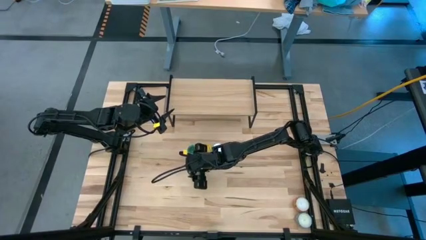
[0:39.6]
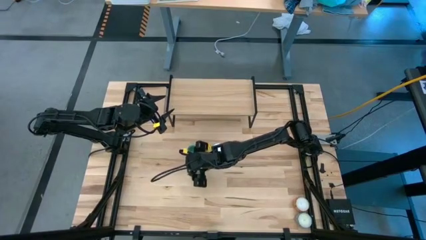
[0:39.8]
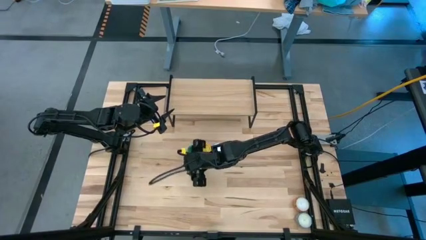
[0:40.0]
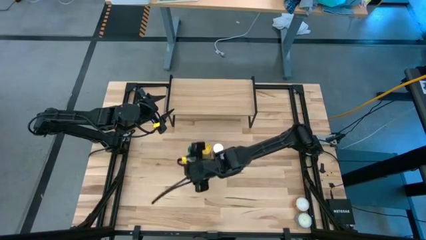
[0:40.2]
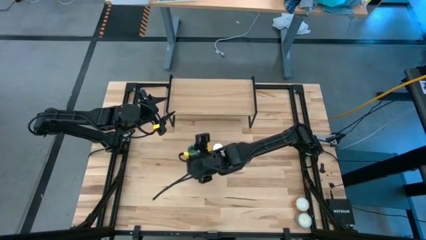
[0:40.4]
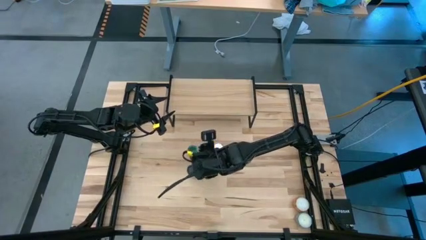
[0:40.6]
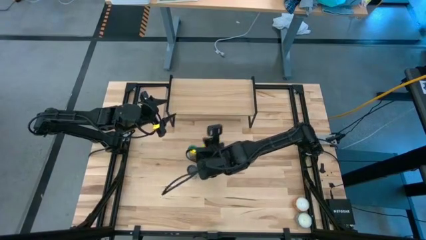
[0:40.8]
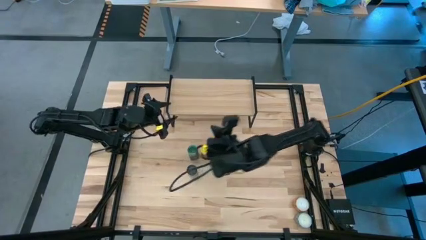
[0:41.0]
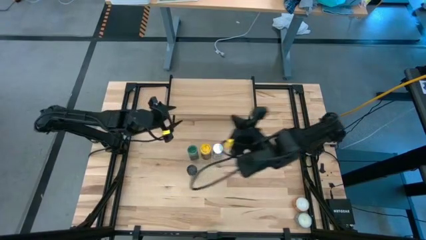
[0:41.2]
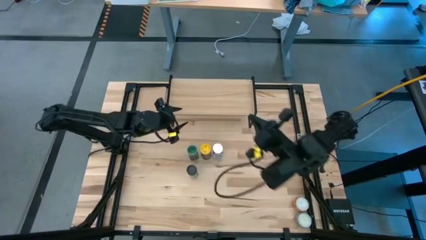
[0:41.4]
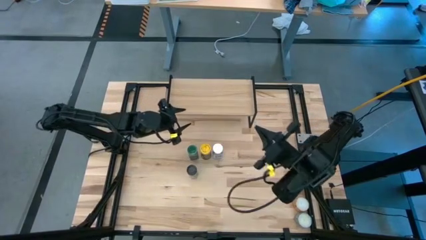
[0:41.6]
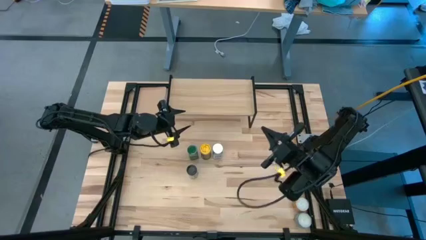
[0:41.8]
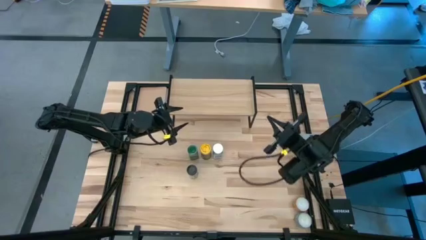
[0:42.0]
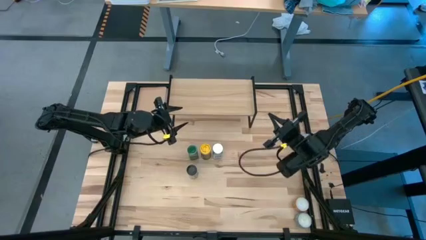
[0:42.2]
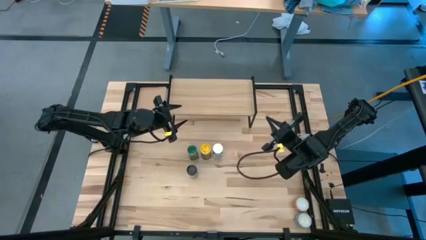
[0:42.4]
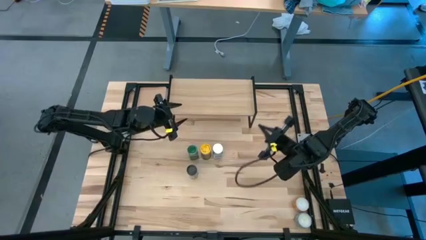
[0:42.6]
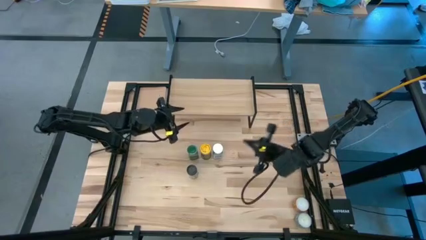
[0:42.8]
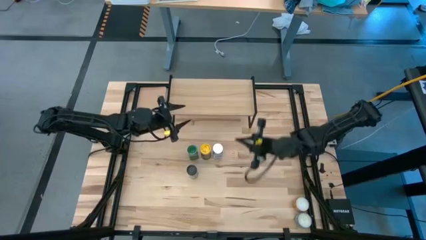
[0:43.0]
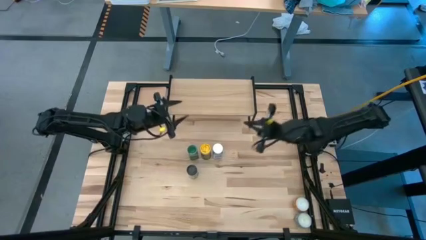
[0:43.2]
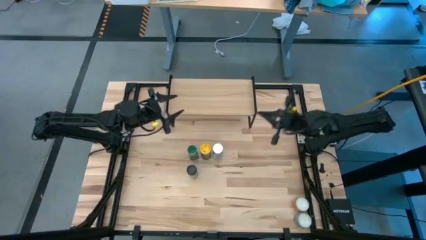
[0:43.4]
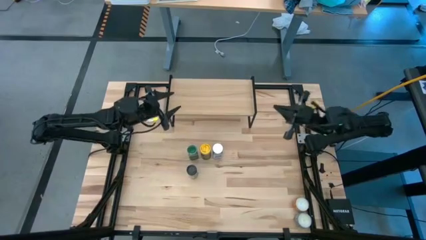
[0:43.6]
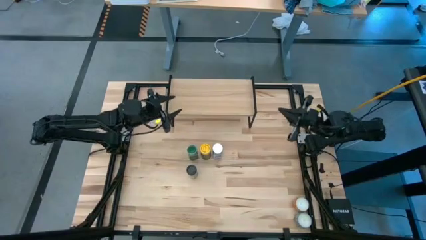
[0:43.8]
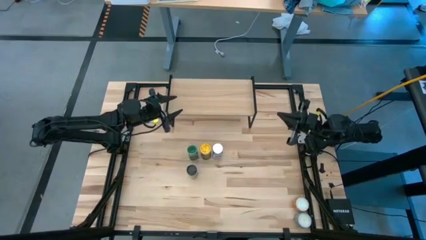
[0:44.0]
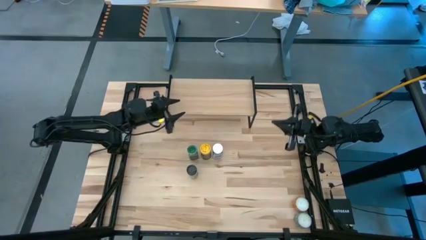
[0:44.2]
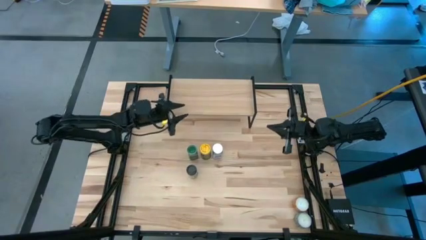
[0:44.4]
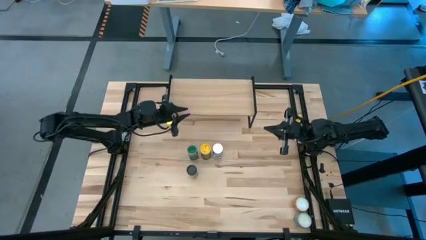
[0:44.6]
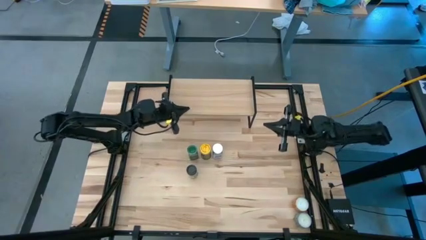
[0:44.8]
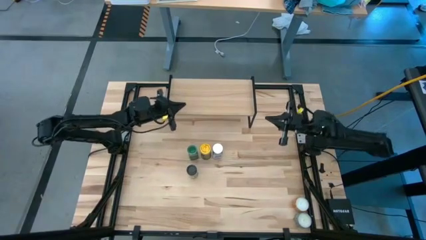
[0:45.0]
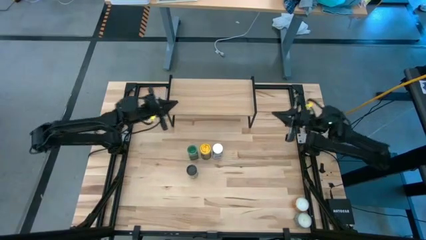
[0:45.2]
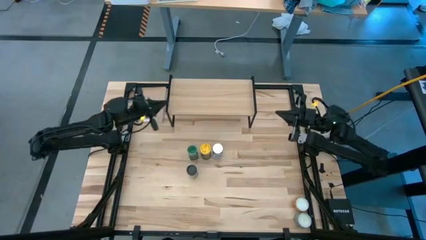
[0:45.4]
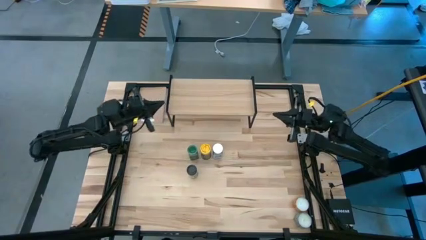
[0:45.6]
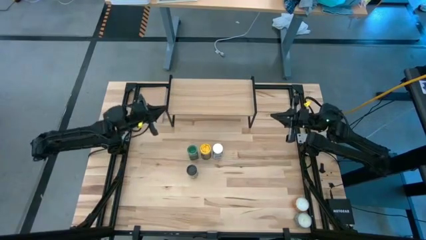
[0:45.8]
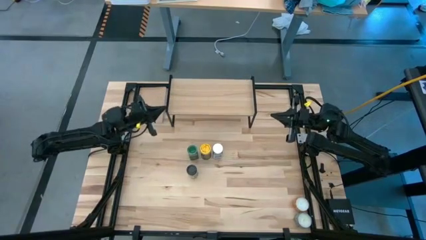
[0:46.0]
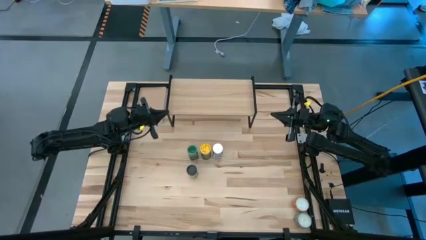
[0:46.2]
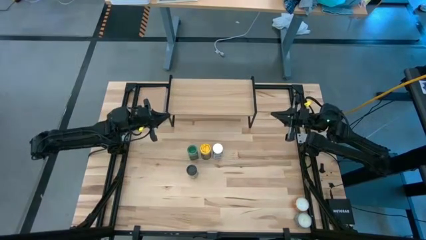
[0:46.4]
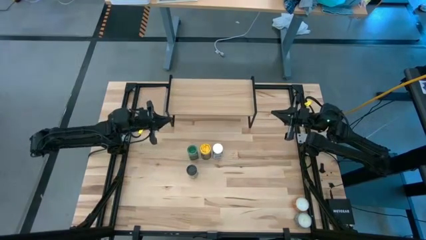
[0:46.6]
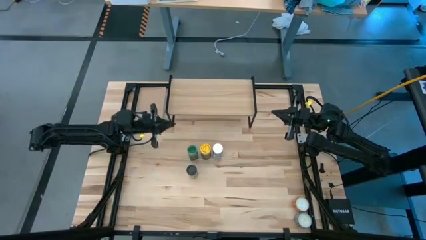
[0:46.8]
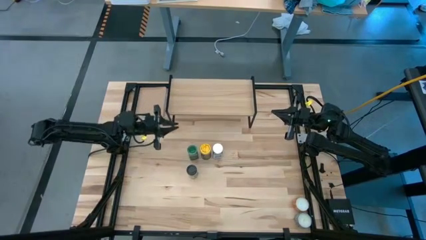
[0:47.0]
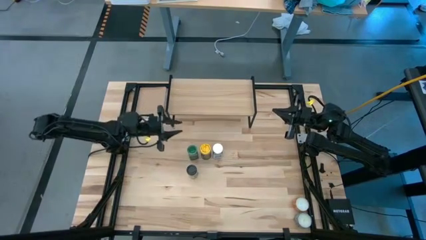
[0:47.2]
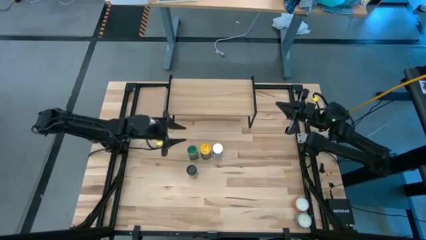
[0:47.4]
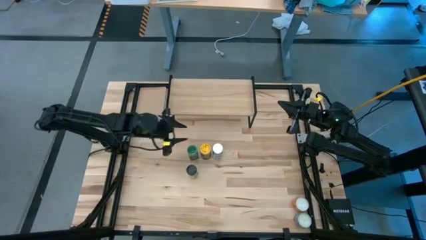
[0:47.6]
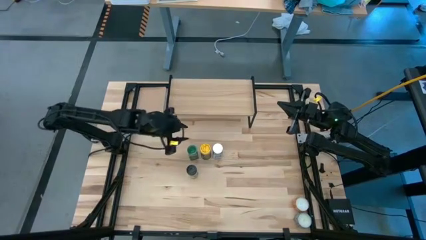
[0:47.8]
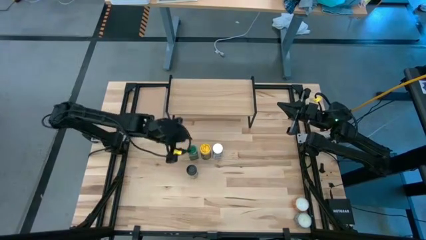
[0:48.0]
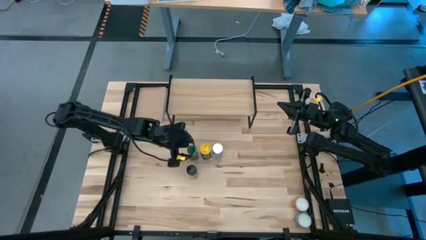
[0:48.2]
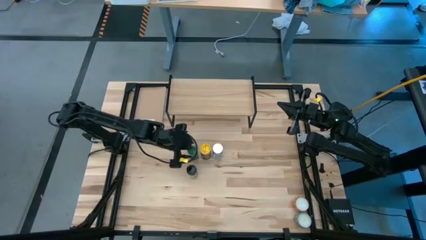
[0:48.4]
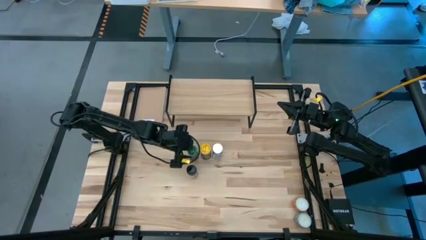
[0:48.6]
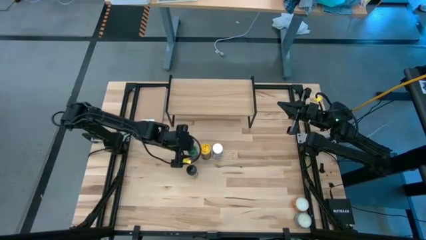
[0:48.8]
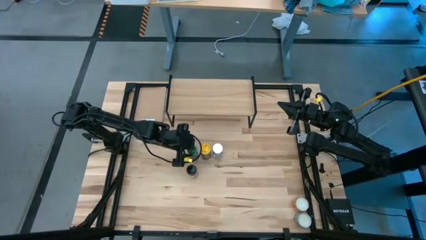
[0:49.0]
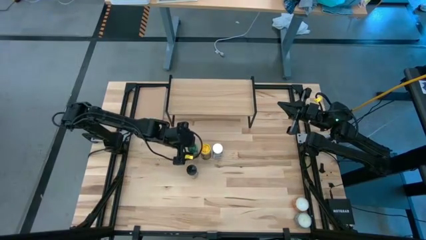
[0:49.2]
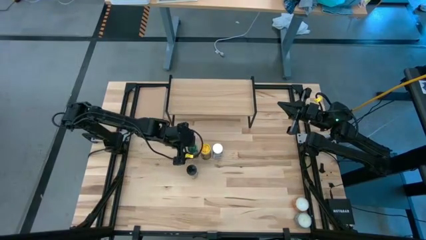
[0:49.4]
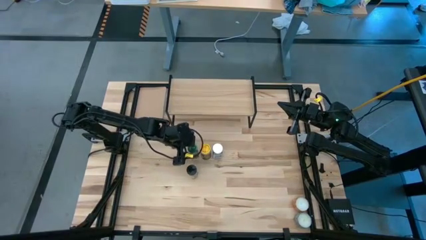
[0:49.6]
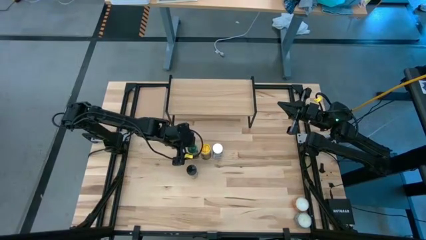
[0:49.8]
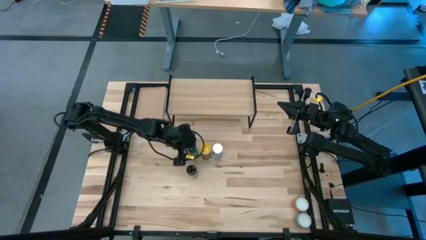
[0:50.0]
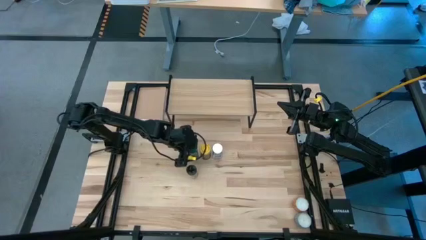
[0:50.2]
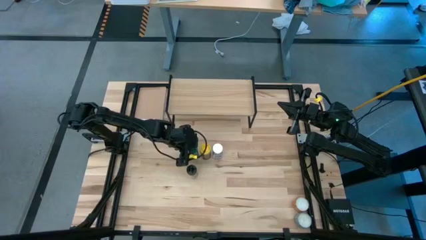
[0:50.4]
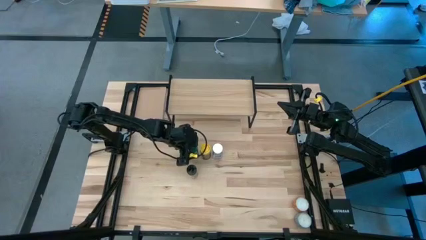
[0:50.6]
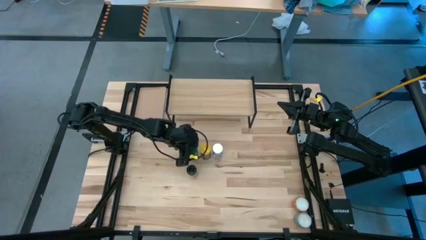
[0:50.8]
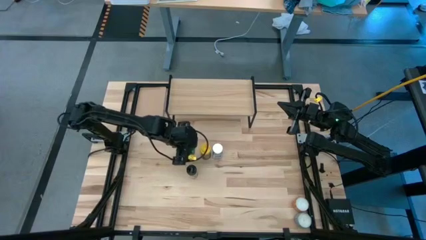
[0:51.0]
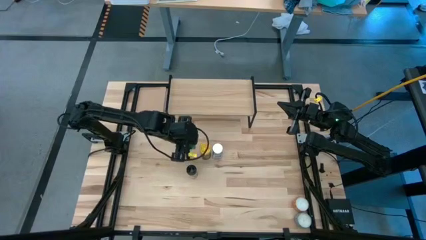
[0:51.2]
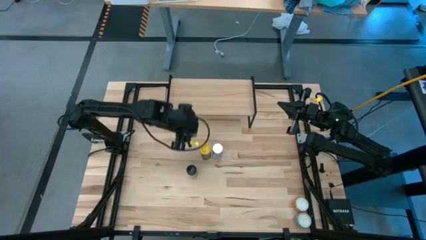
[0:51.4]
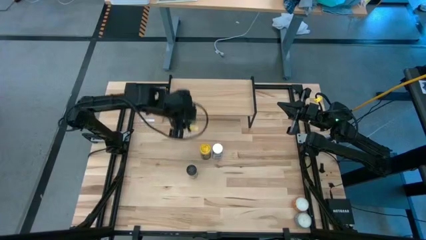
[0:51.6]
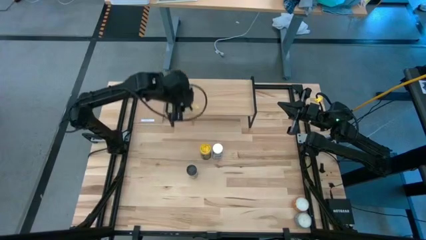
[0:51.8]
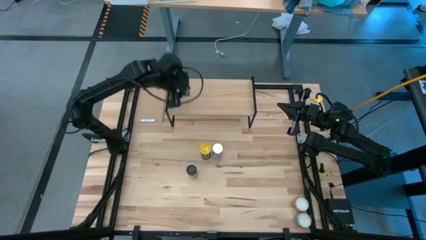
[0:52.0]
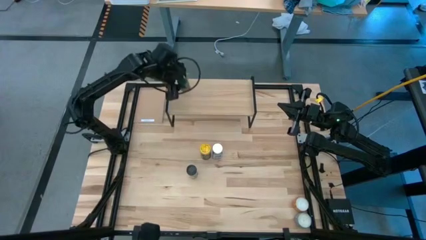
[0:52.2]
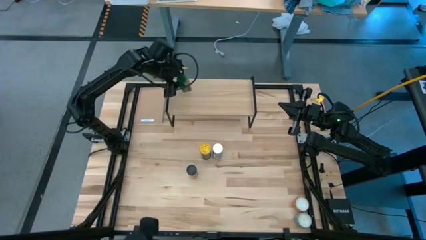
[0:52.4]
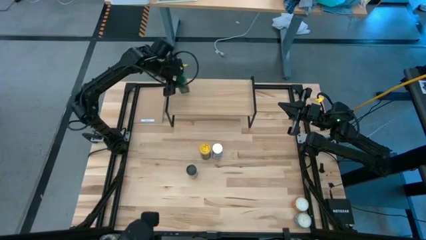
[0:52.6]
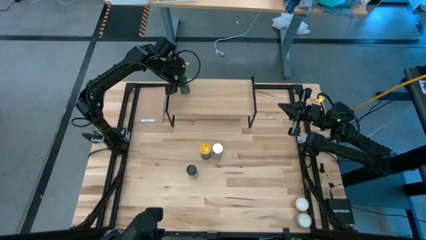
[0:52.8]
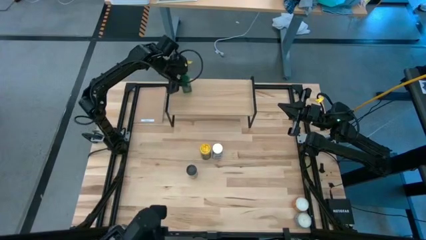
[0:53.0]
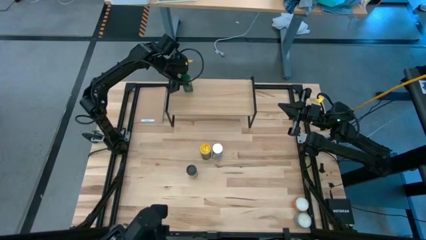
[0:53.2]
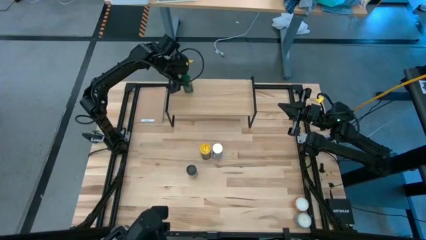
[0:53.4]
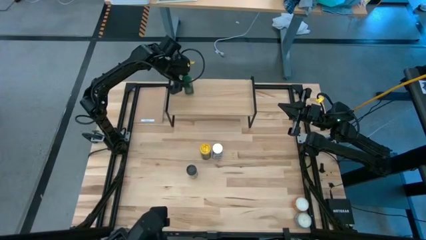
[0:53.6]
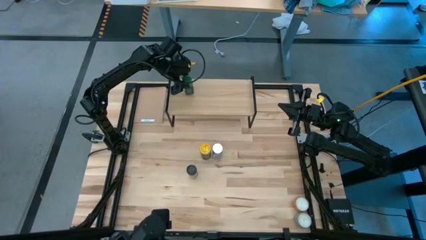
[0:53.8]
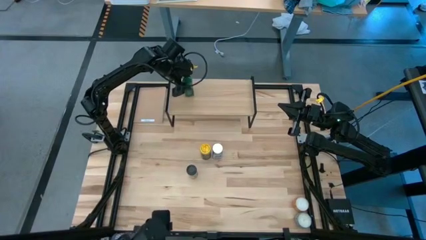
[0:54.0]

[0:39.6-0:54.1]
Task: Shelf spices
Put the green seasoning bottle on the shelf
